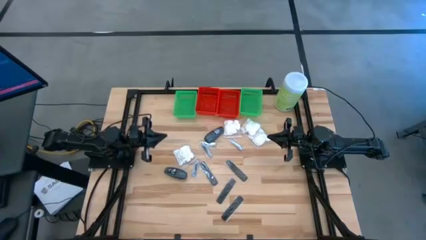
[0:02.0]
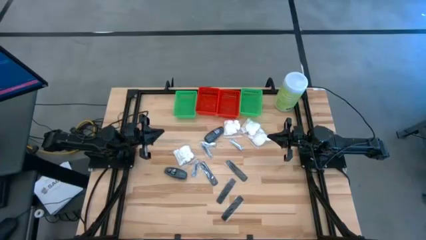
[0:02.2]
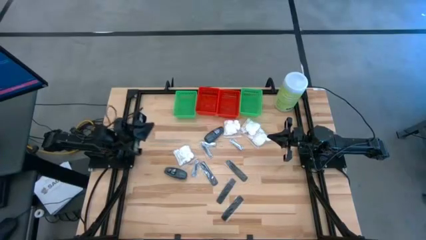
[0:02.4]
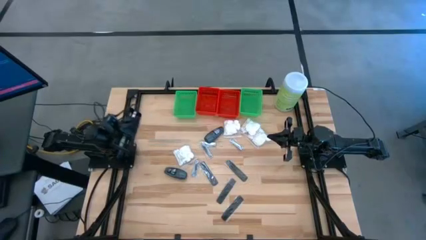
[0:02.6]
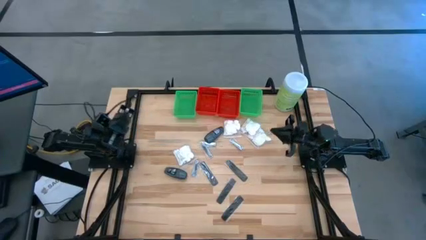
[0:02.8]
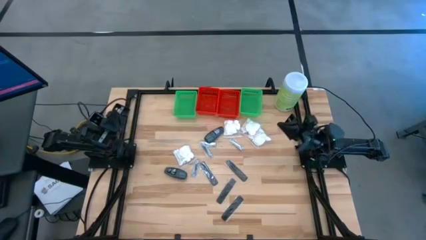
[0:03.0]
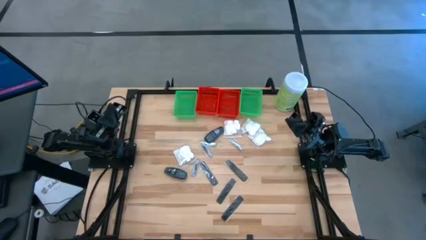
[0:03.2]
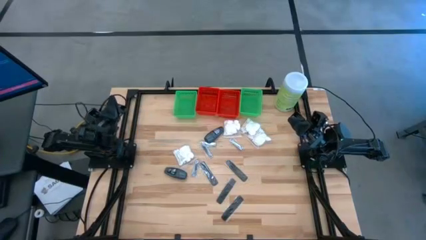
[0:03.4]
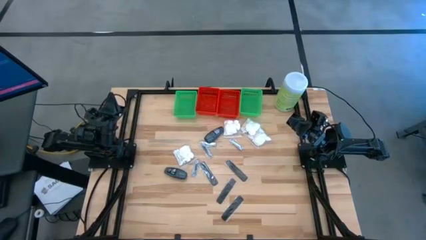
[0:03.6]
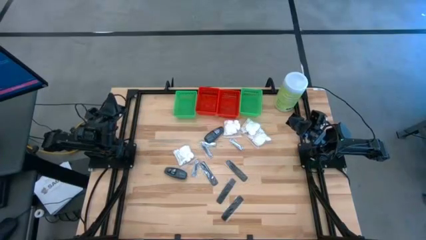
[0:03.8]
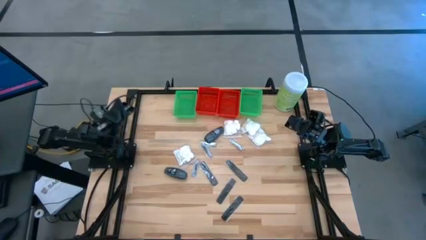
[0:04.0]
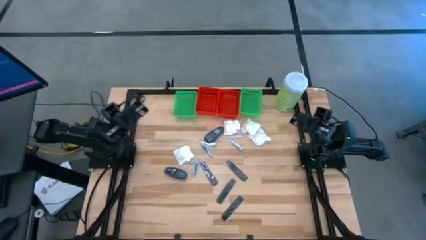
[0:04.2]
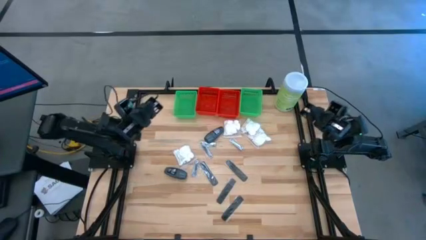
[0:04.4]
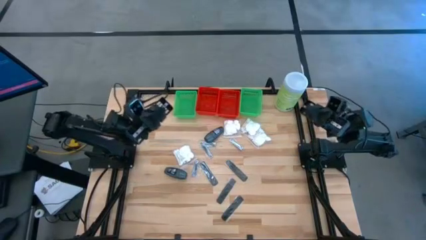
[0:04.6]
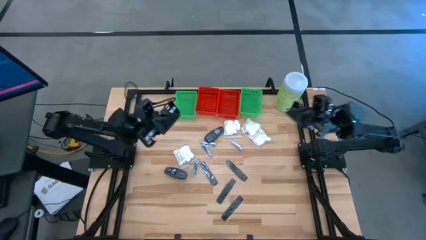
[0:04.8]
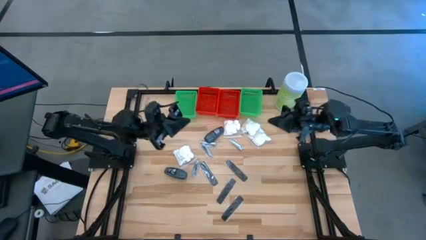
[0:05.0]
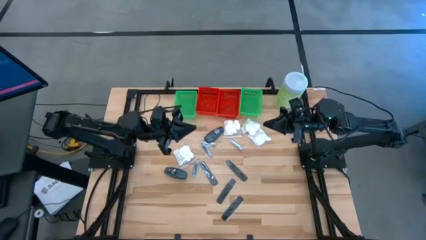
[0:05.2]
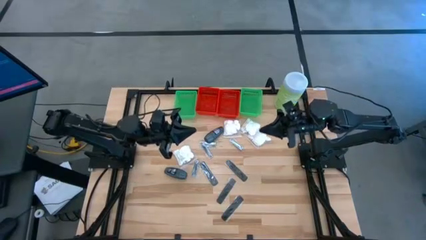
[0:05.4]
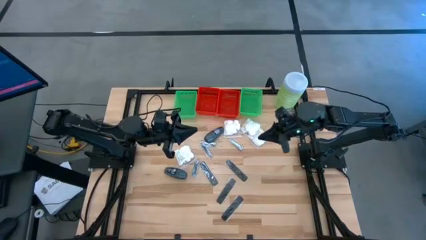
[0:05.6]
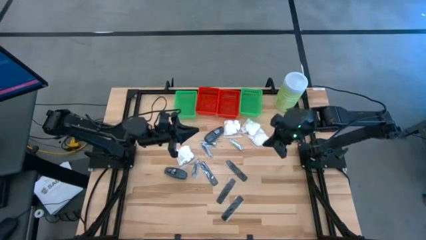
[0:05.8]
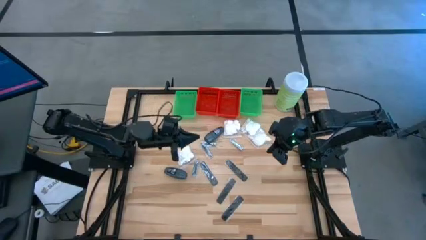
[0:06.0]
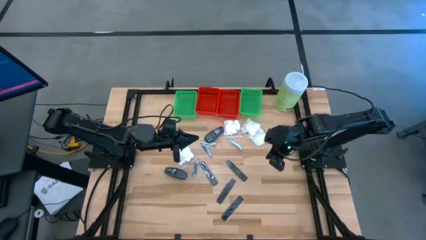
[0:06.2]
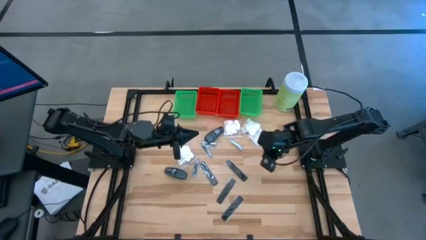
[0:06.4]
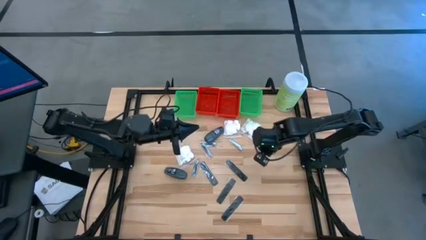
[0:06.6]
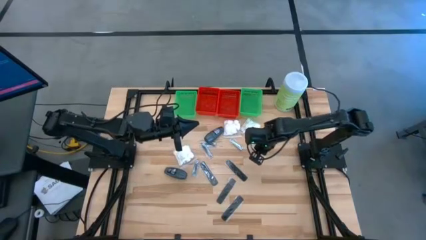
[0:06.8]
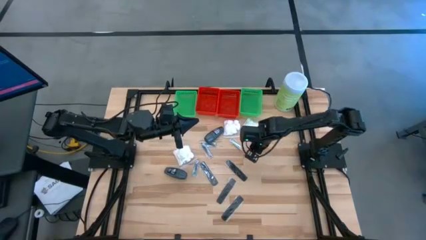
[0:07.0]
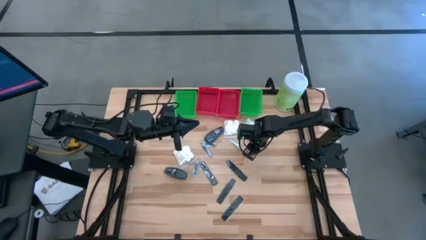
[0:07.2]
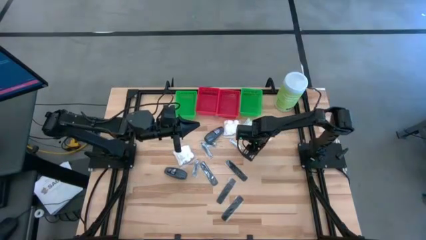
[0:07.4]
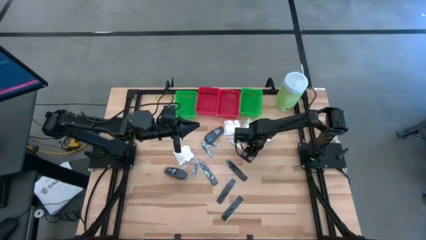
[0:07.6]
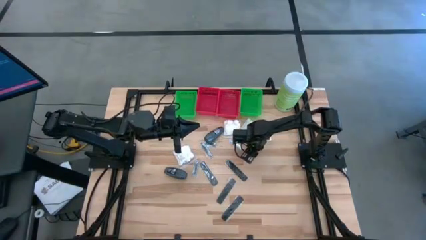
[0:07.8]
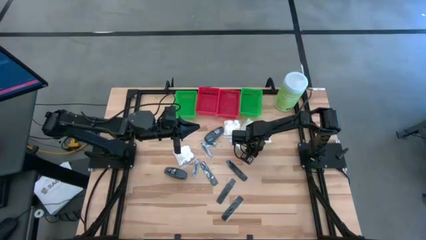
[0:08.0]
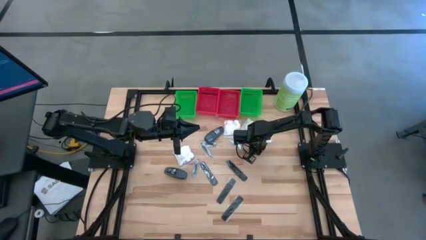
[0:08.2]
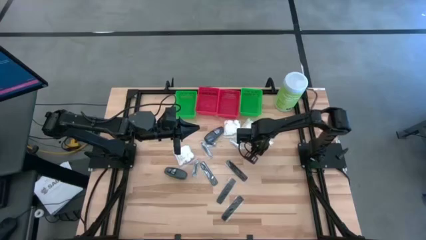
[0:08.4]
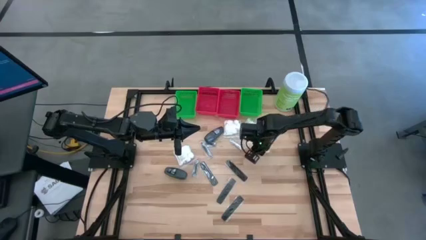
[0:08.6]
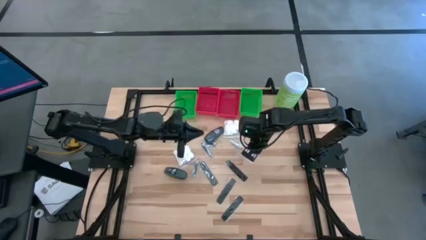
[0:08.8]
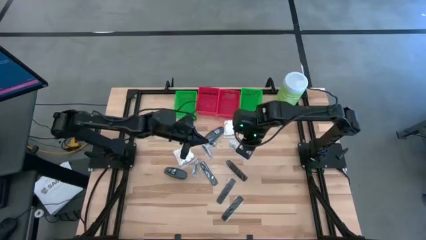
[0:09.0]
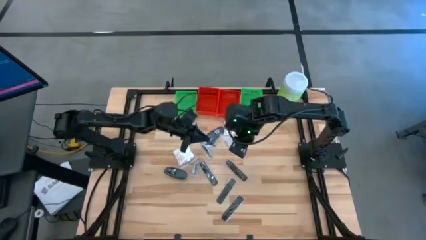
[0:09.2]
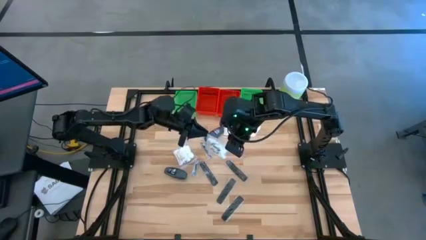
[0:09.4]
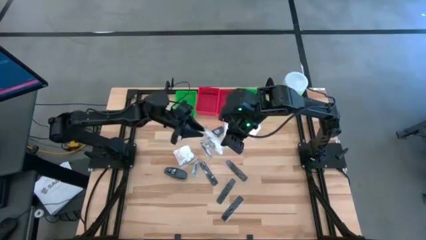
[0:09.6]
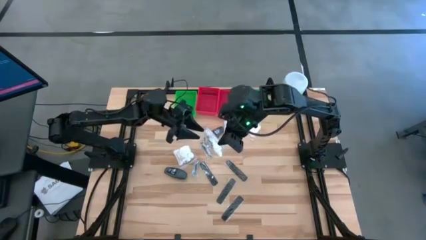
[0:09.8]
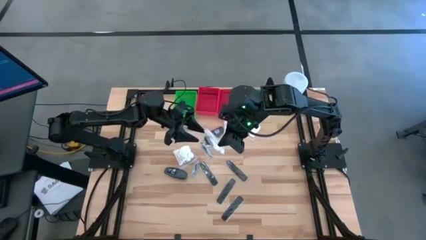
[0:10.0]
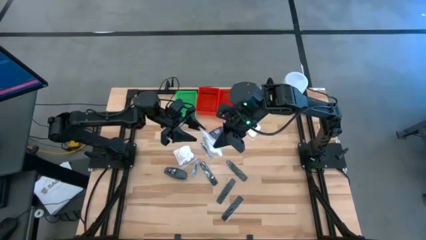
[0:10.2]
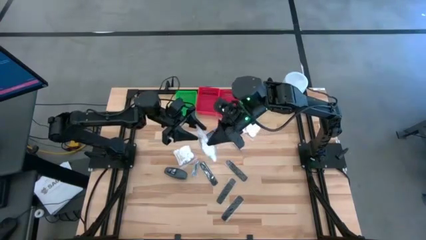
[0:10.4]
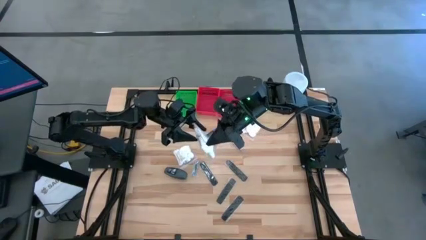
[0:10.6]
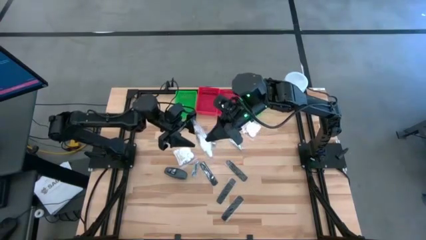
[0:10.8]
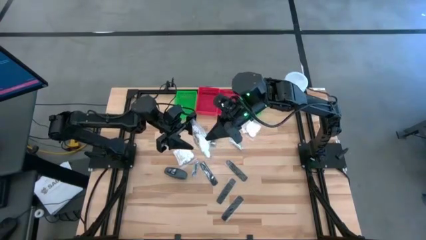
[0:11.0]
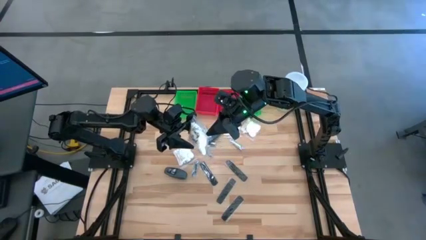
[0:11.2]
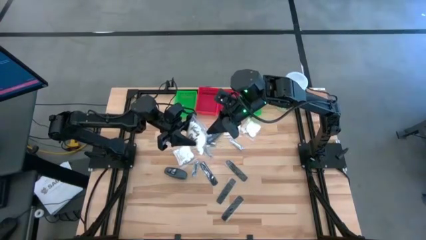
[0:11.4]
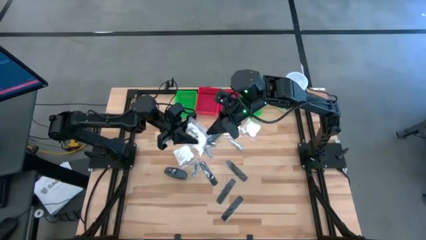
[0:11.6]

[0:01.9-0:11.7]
Task: Pick & Place Travel size toiletries
Put the cotton pack into the left green basket

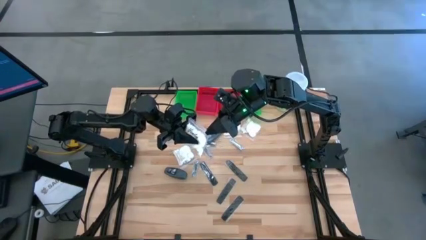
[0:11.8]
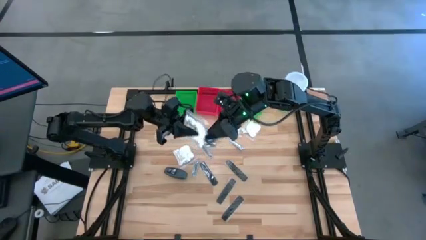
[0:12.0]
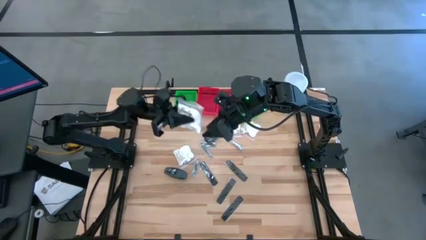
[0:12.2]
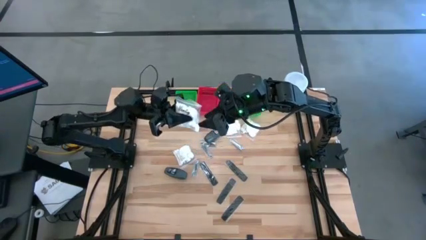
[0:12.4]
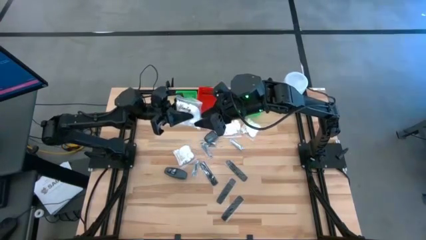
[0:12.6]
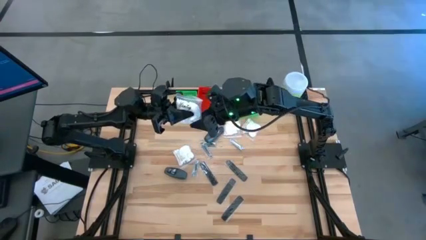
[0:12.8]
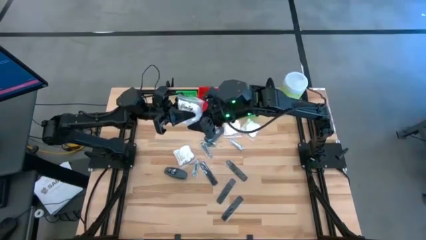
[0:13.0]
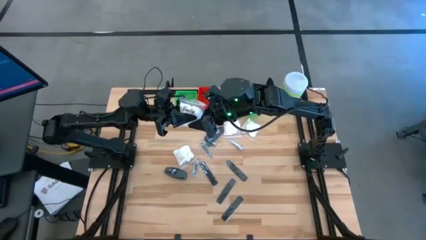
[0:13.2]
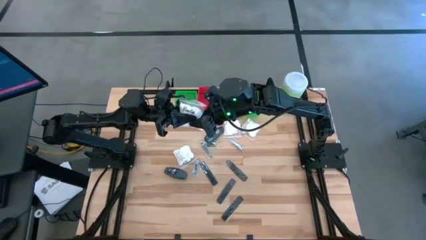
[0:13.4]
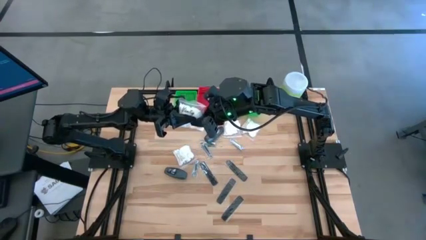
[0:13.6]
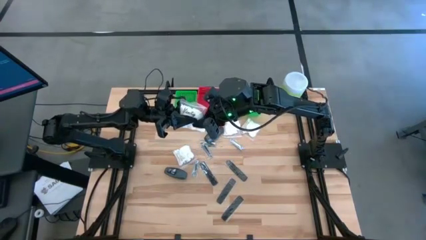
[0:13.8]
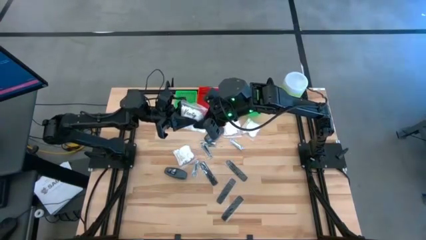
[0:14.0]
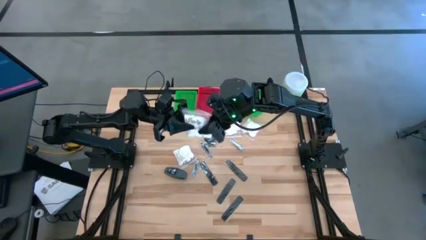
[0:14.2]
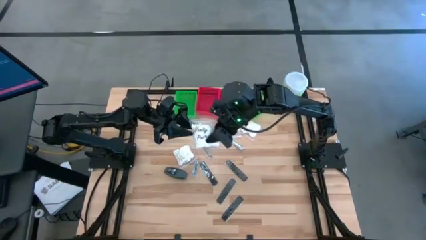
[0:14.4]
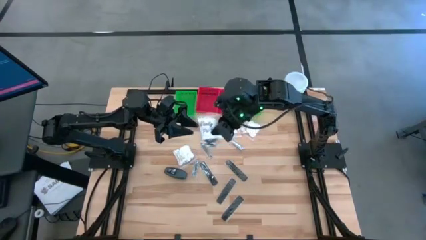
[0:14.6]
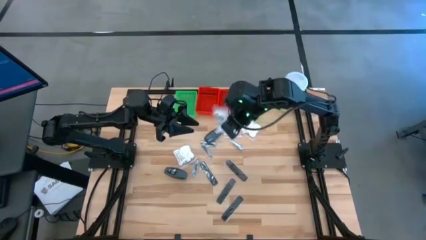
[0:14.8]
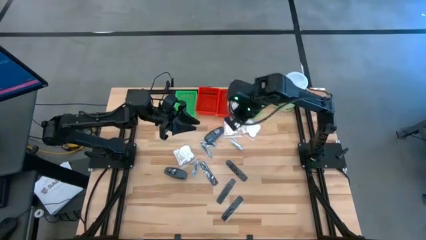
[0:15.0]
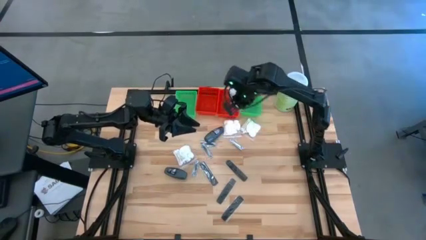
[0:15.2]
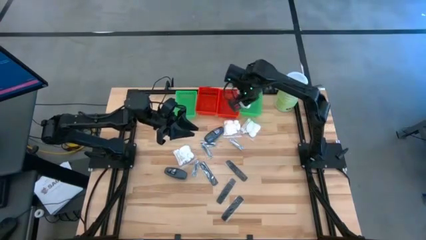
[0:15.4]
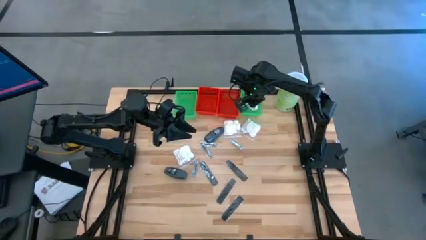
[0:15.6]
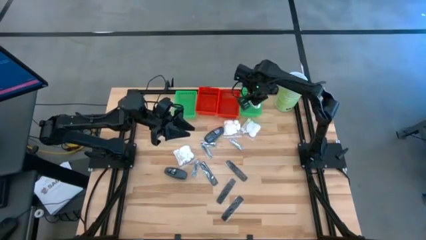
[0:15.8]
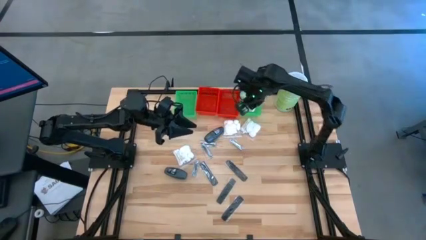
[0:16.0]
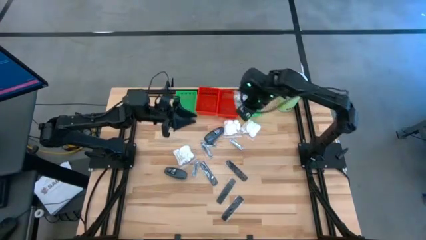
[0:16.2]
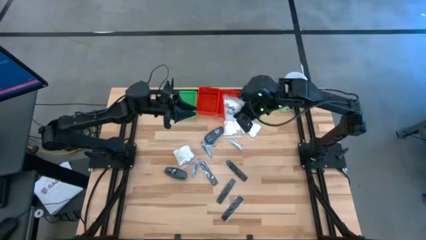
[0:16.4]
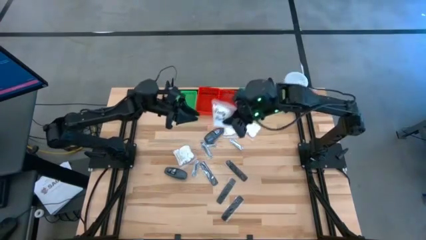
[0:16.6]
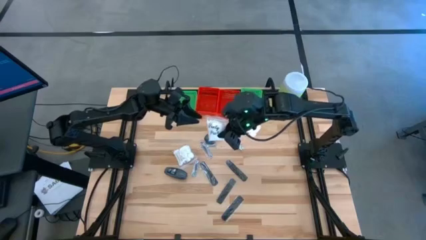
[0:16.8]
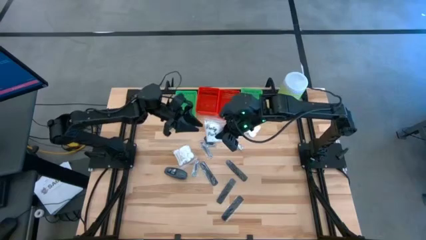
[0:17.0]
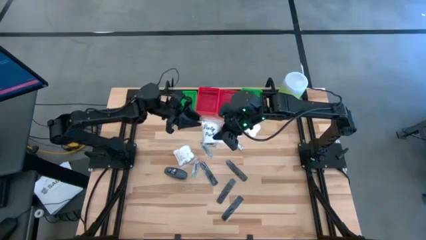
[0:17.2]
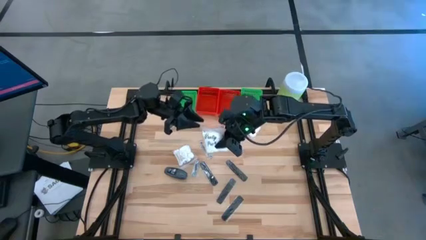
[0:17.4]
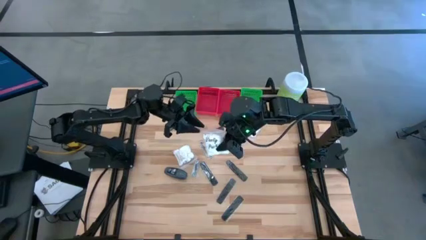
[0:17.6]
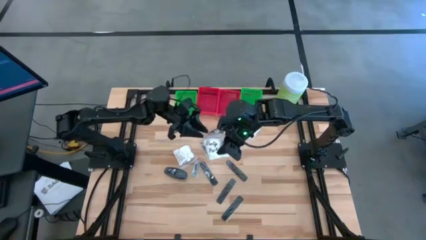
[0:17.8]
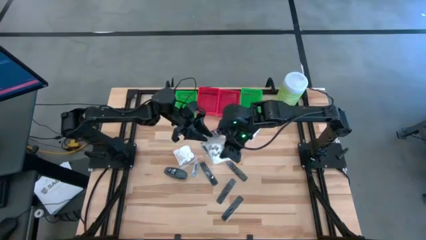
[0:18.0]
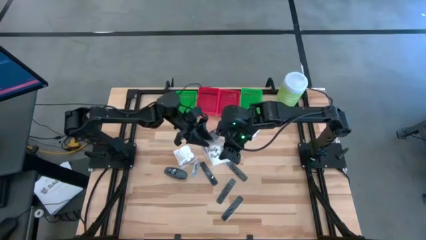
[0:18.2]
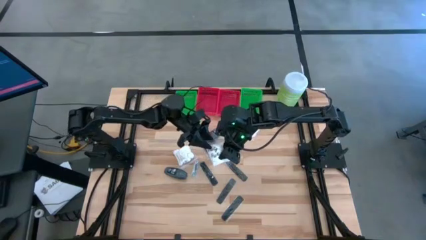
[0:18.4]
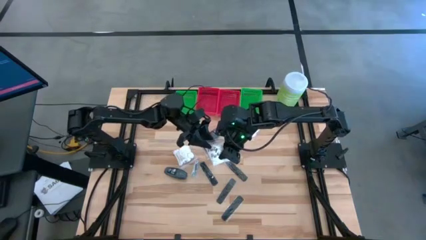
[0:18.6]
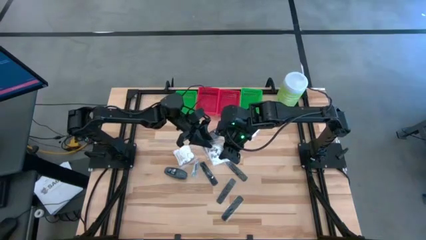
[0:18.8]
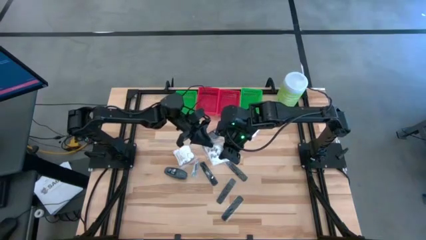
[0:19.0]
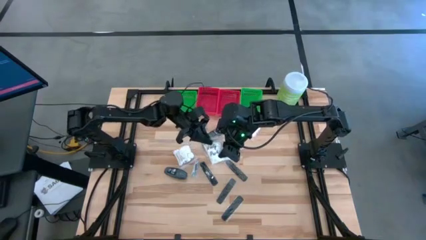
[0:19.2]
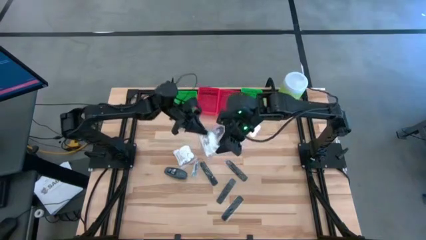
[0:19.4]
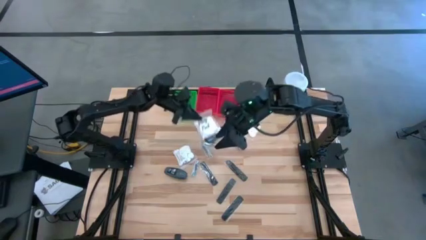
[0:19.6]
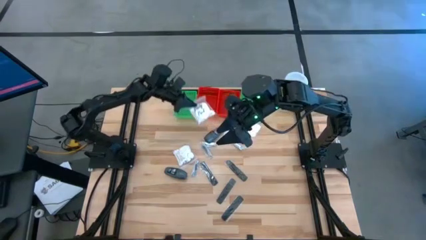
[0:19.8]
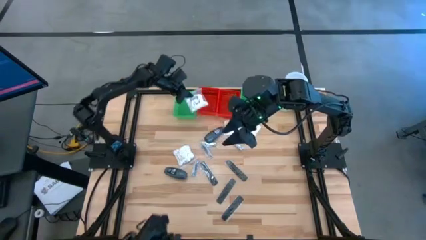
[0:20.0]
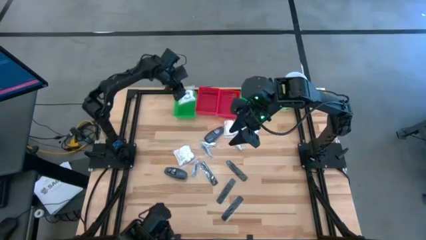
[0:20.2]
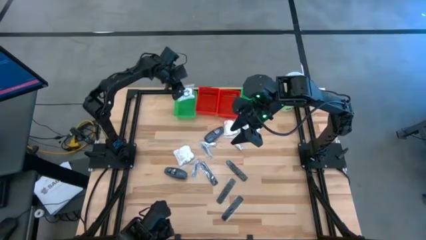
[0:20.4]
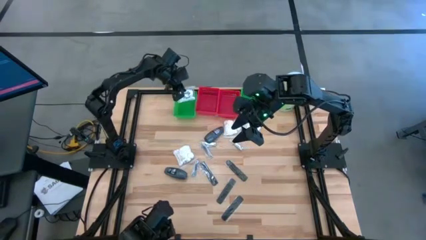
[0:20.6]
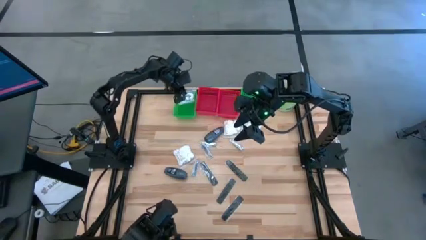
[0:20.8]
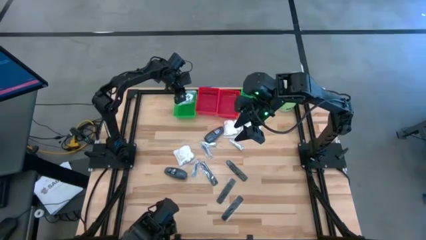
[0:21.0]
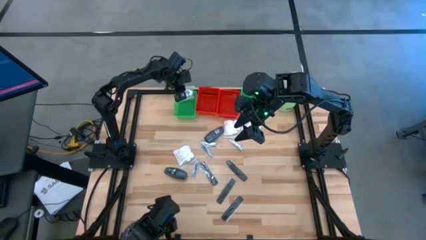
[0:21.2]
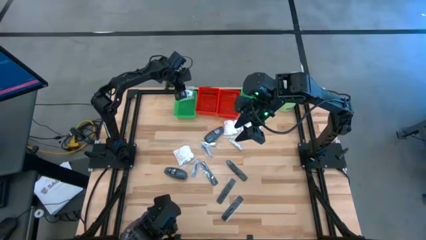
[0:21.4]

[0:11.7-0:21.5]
Put the cotton pack into the left green basket
